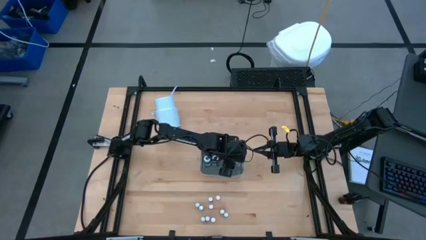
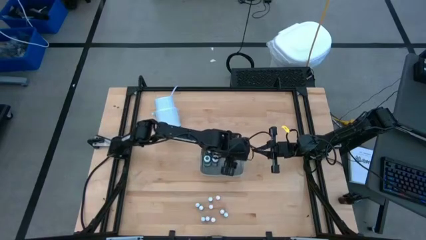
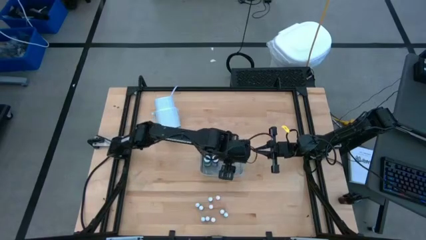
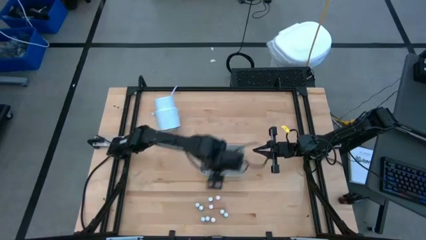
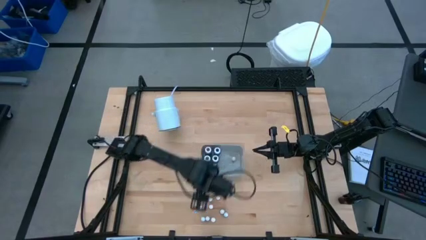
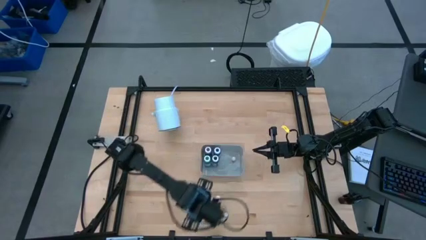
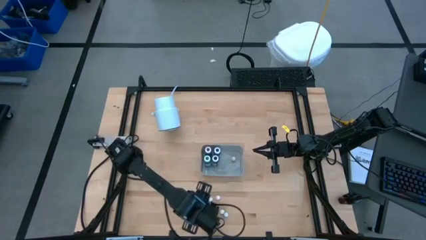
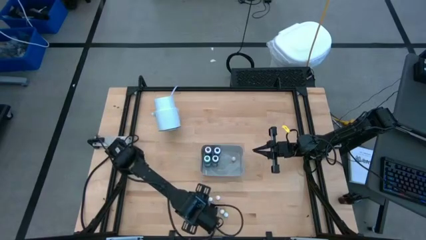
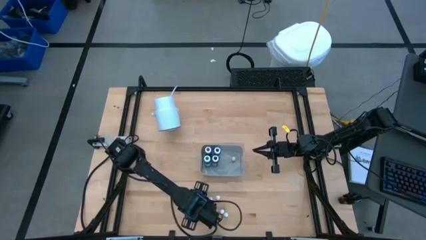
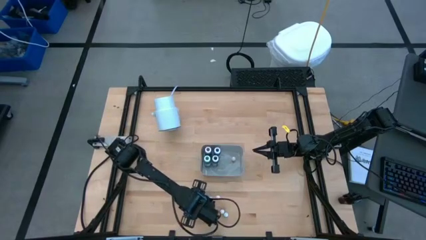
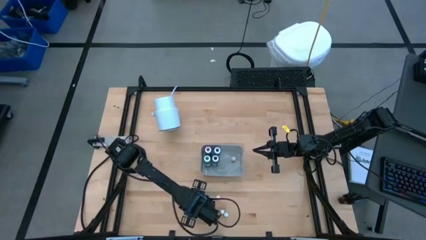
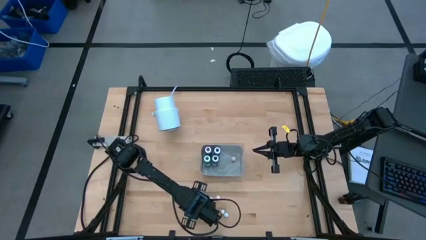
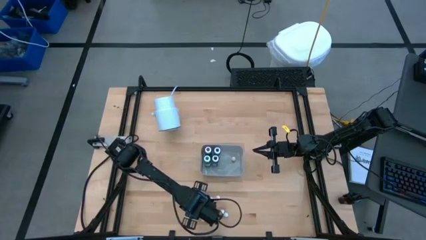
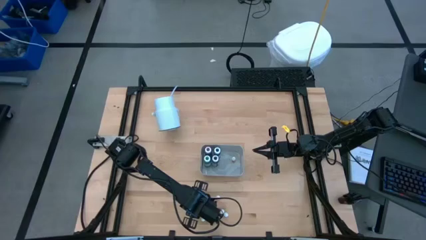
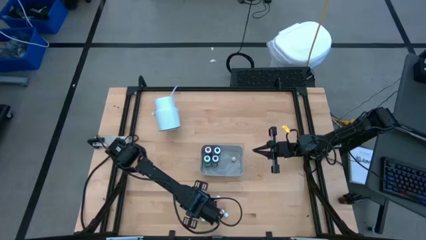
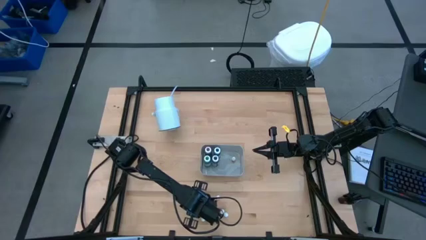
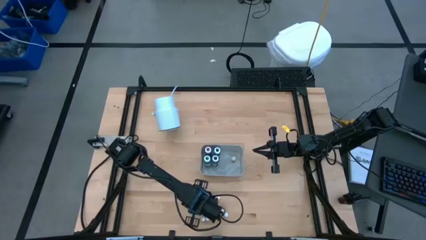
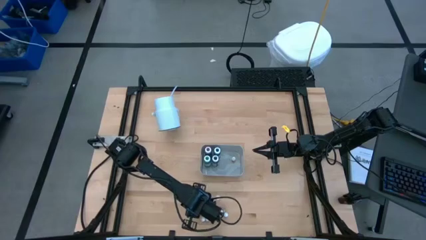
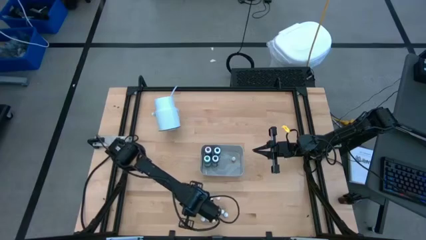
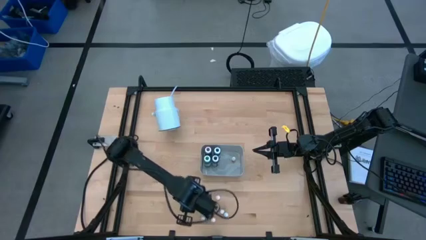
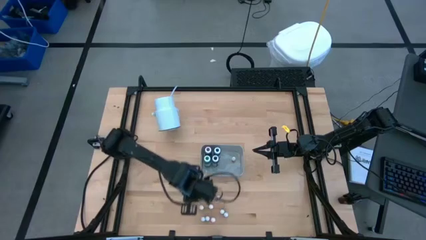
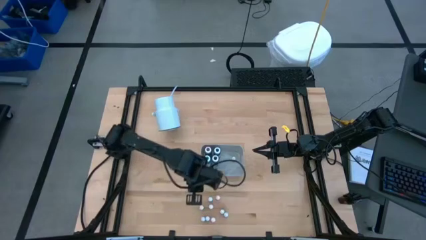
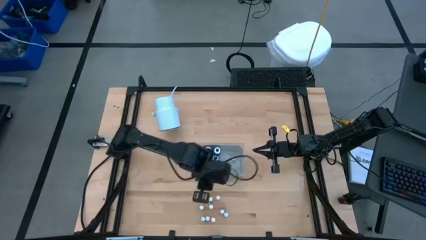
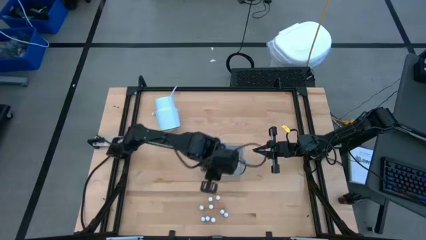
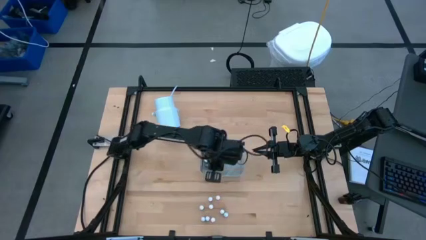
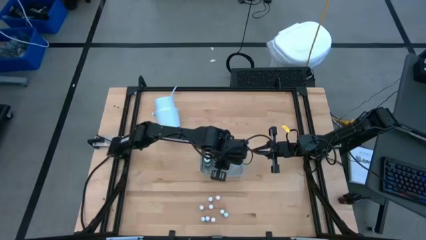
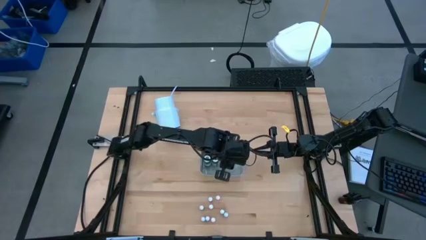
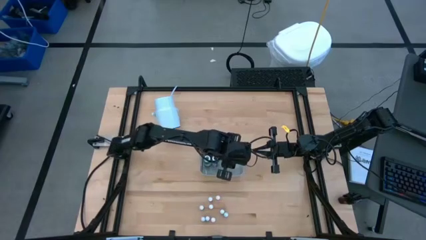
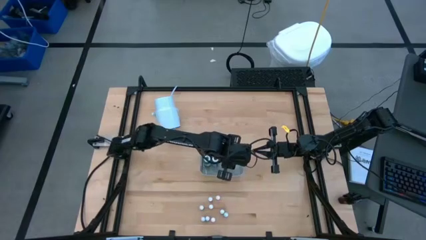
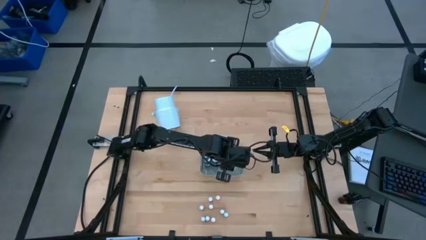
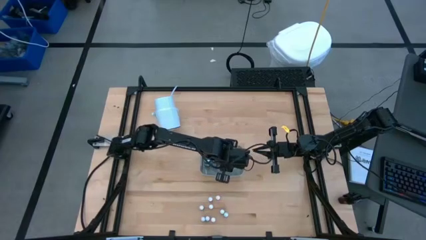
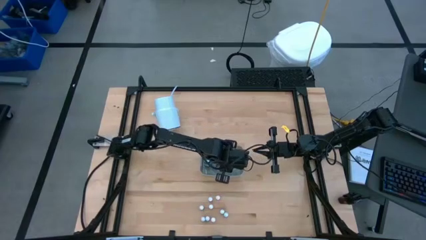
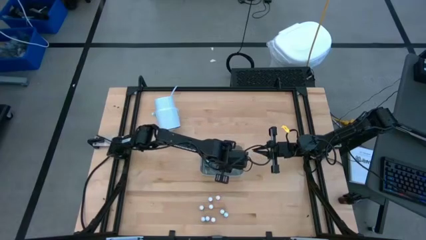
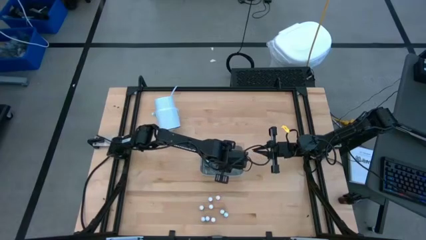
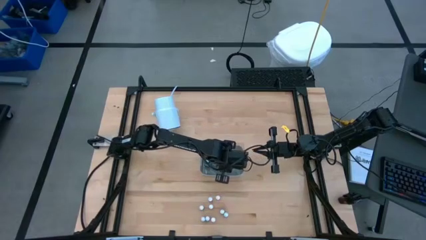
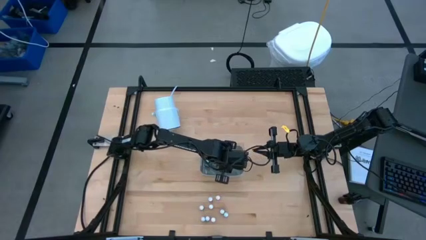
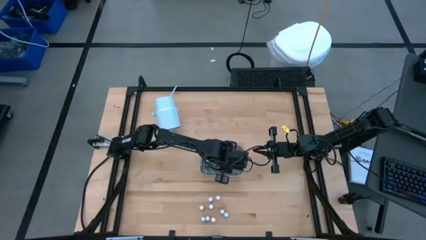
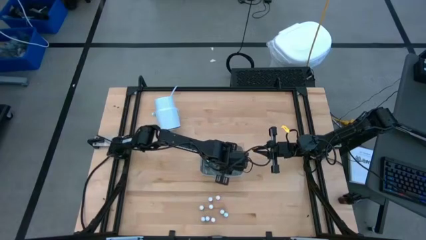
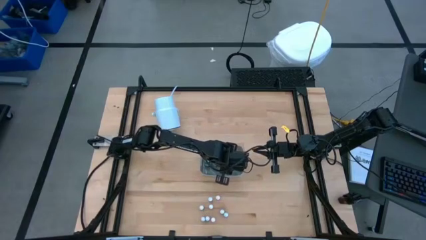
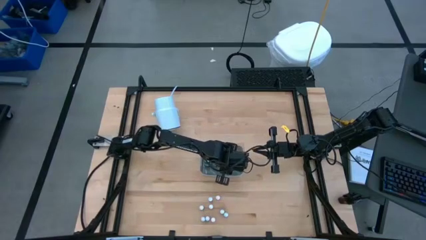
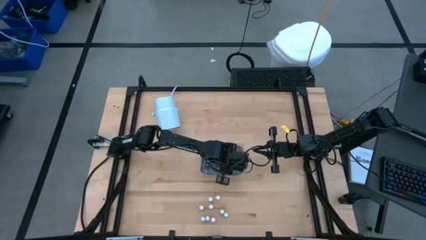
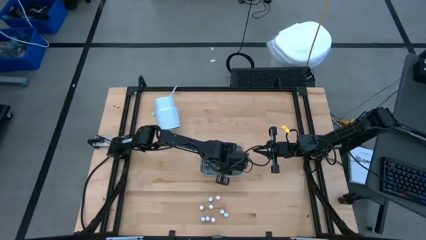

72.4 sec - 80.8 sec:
Task: Pick & Place food coloring
Put the left small blue food coloring bottle into the bin

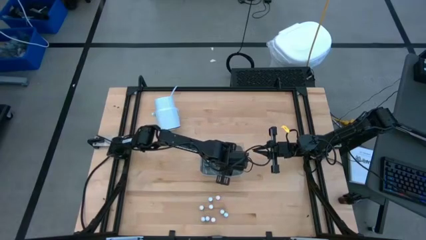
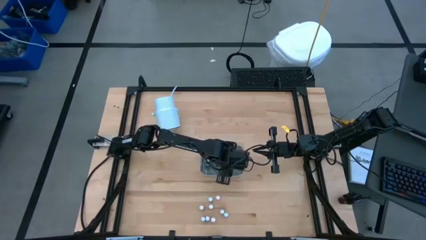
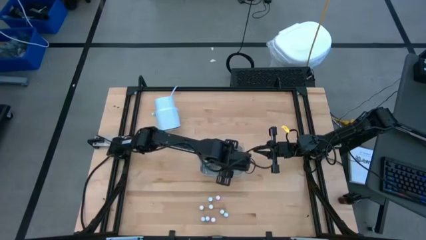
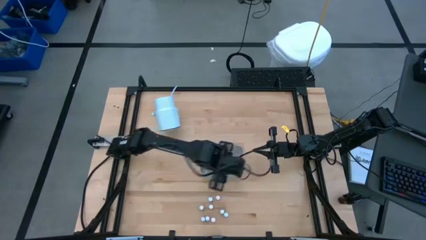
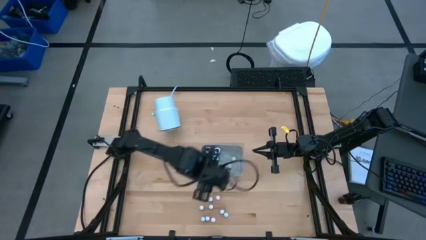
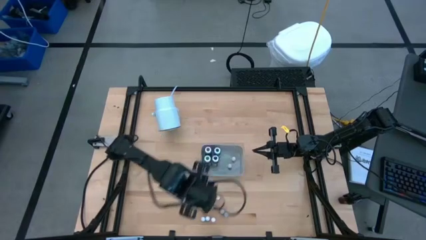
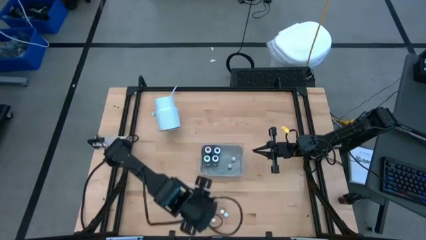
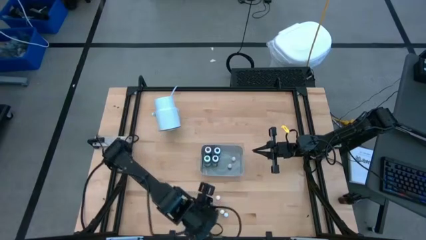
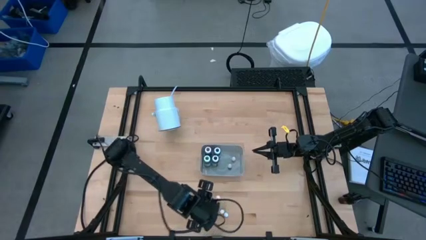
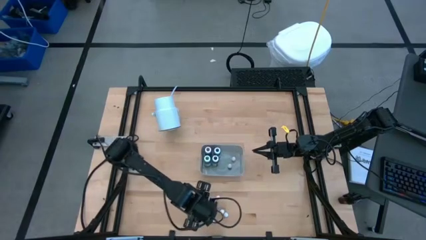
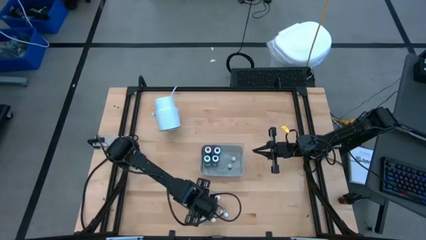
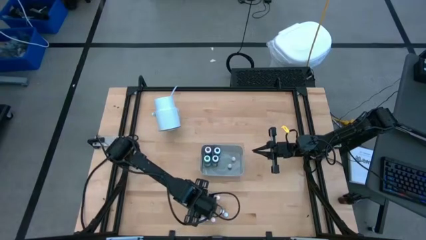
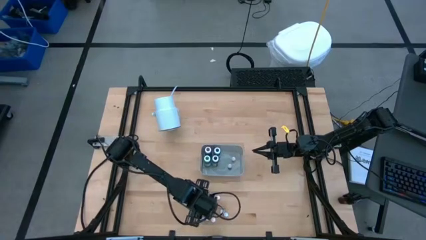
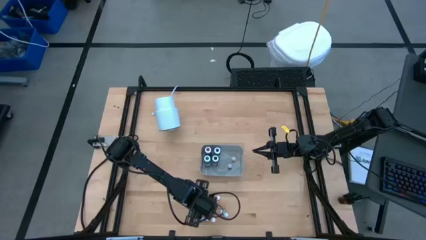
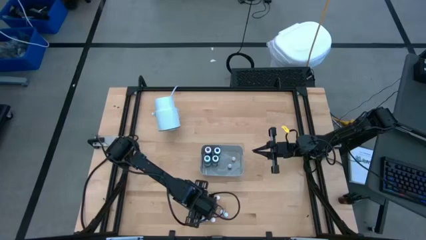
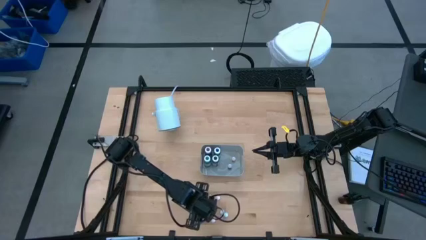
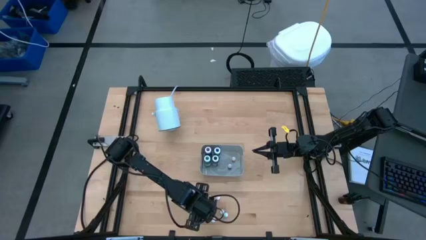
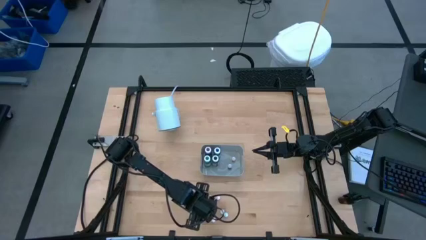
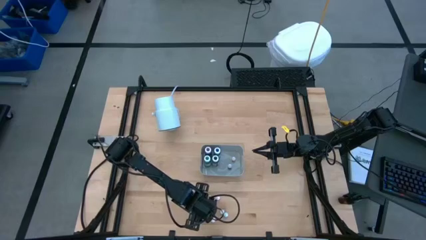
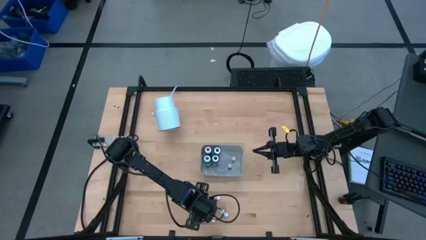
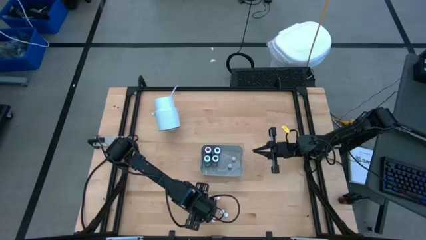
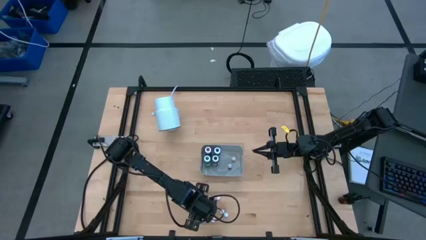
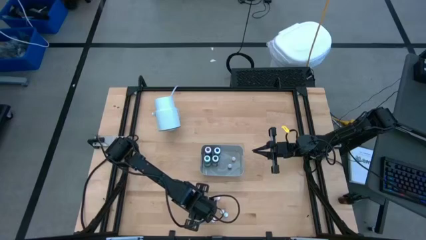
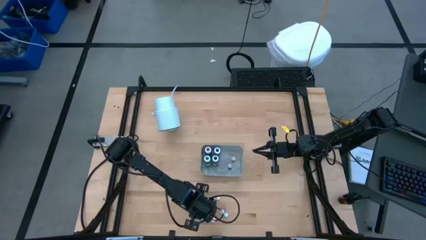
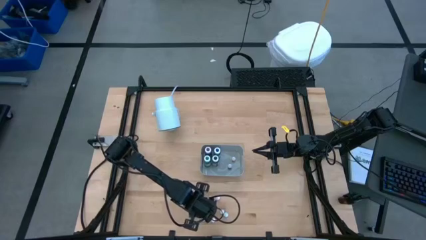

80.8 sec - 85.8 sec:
Put the left small purple food coloring bottle into the bin

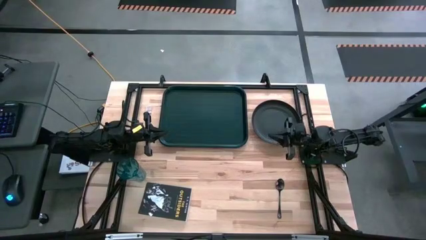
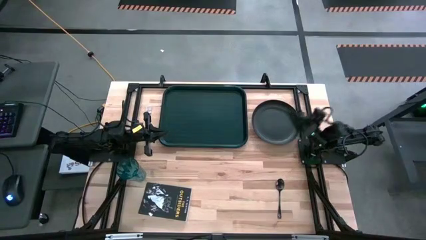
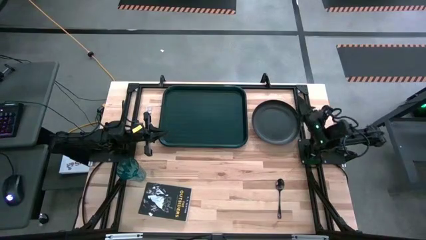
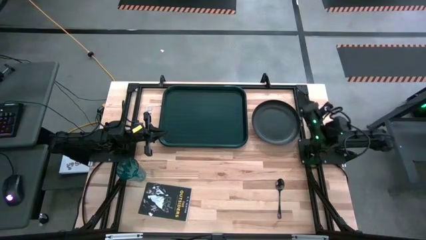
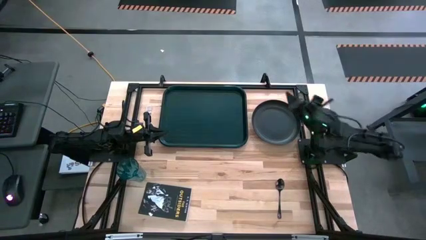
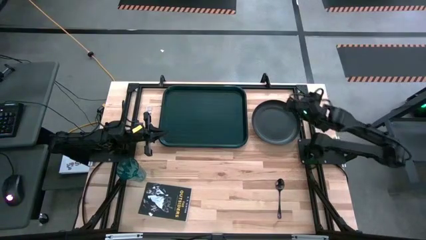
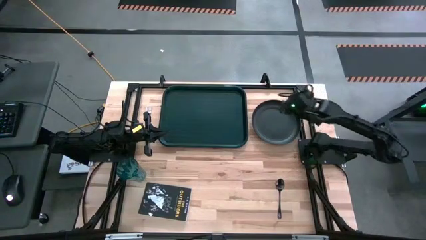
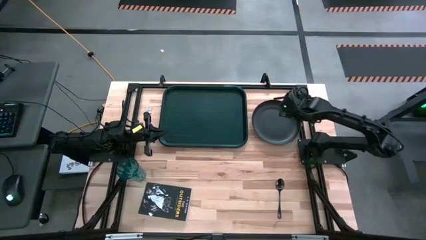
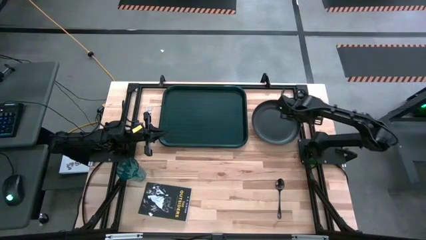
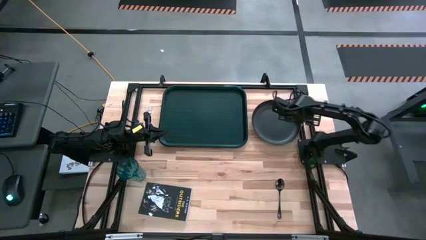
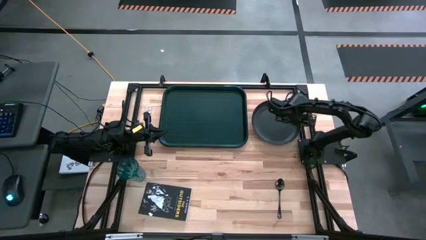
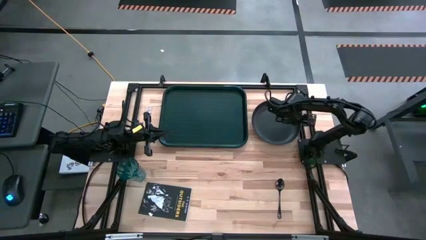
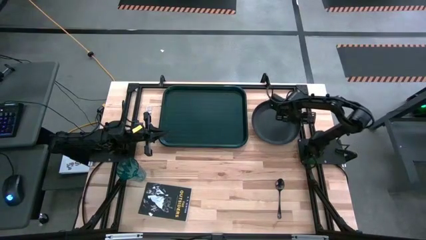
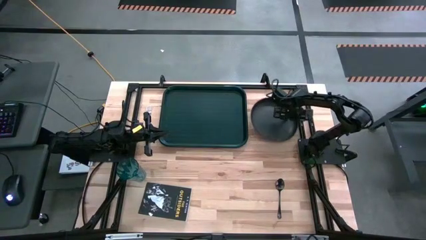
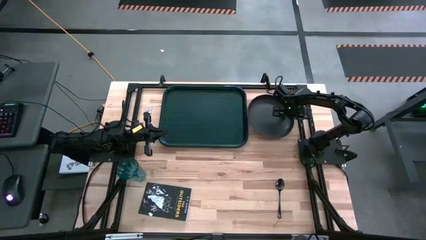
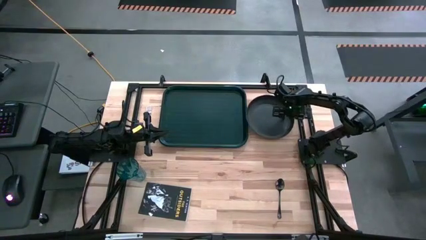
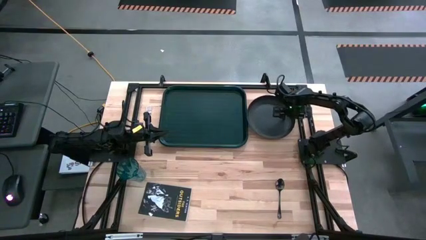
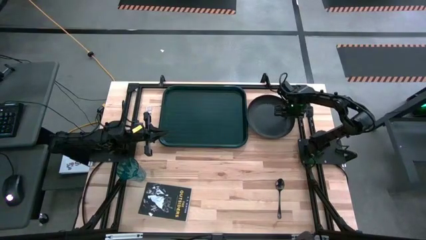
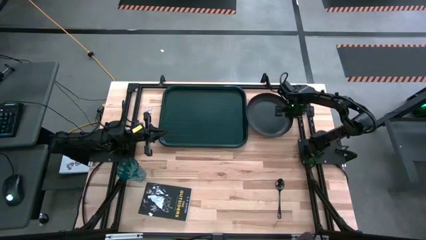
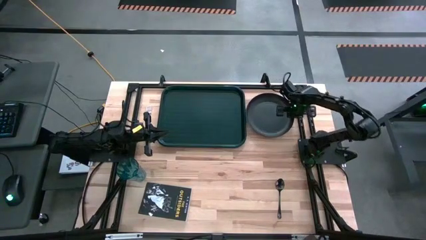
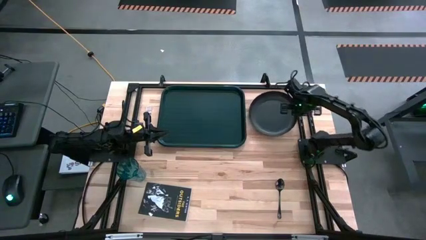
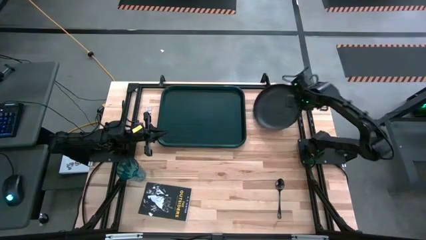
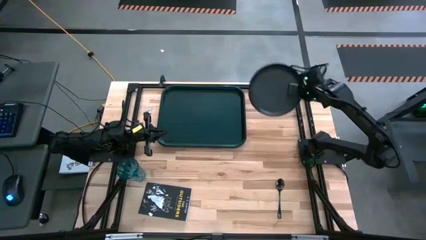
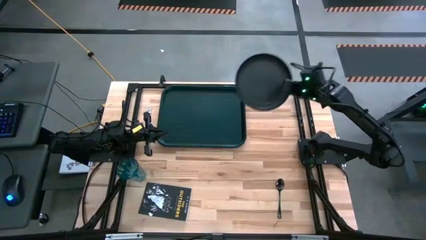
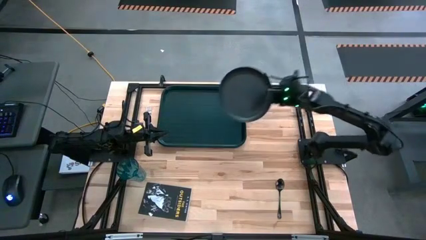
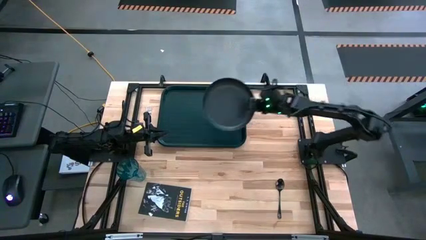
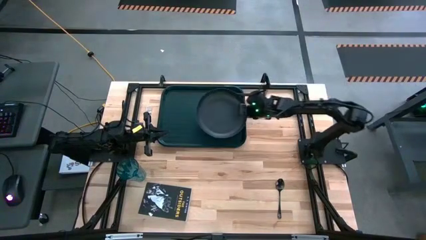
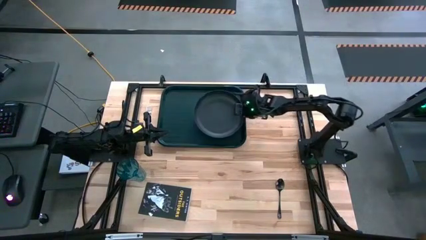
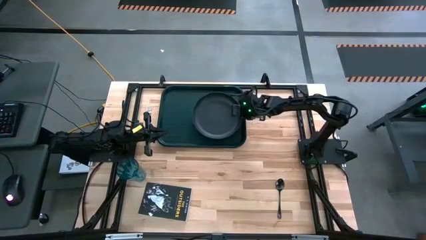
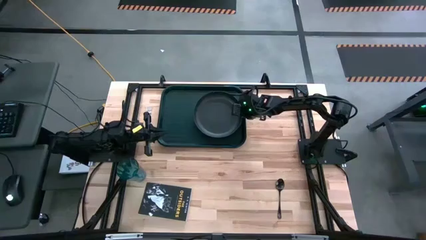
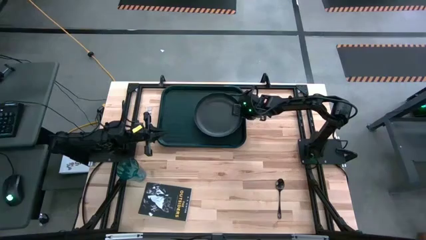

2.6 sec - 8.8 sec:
Task: Pick and place plate/cup/fork/spoon on tray
Put the black plate on the dark green tray
